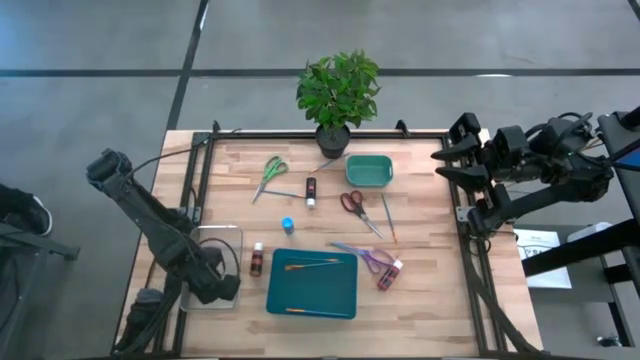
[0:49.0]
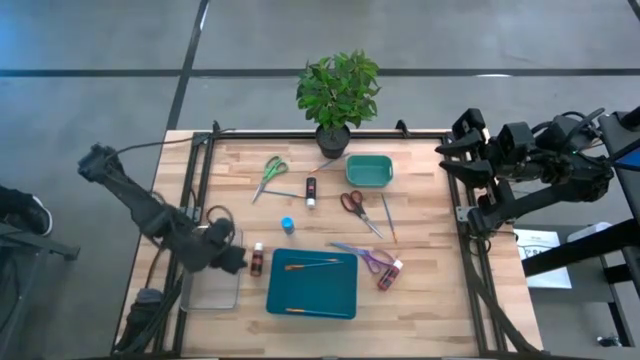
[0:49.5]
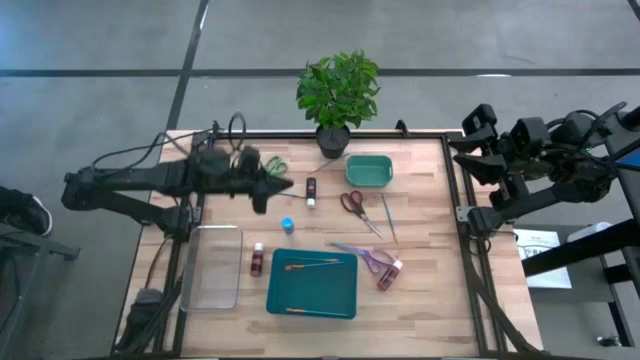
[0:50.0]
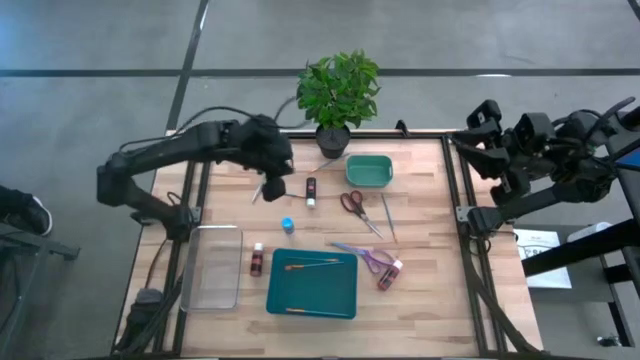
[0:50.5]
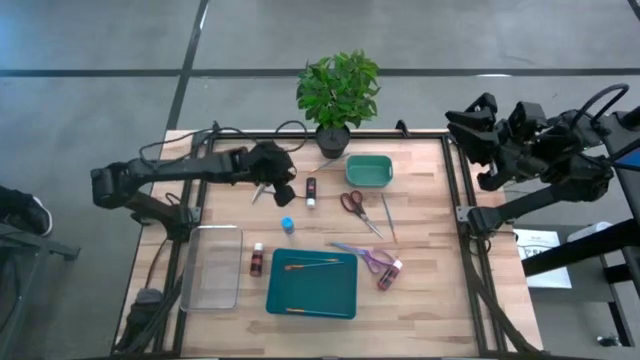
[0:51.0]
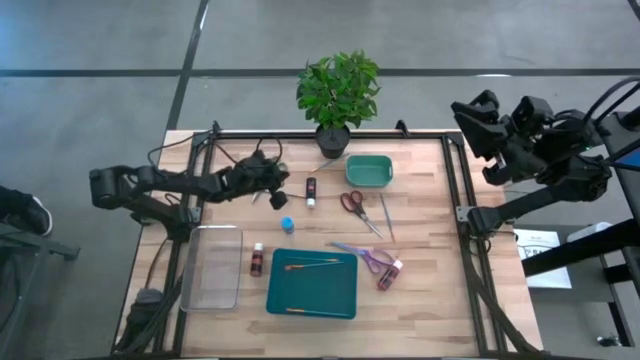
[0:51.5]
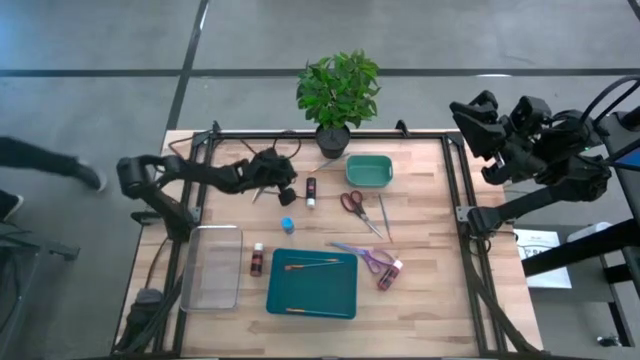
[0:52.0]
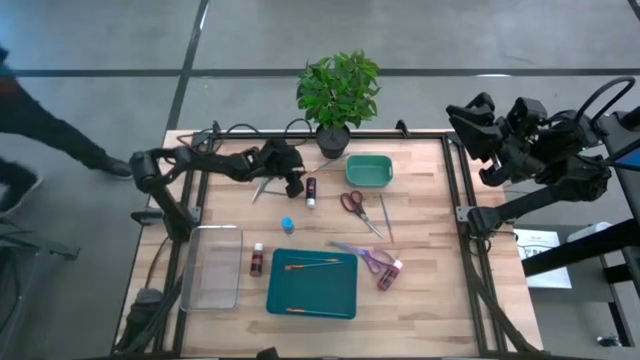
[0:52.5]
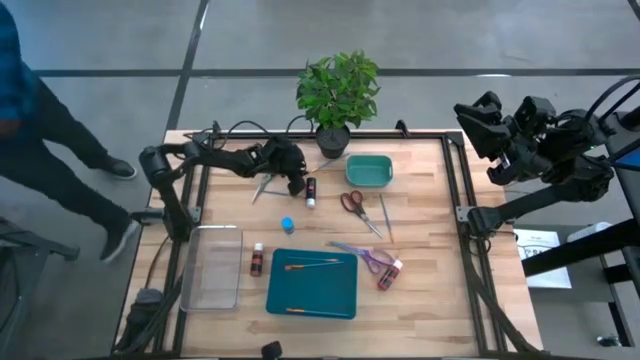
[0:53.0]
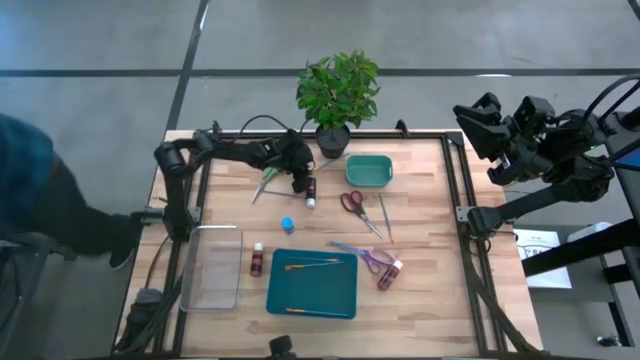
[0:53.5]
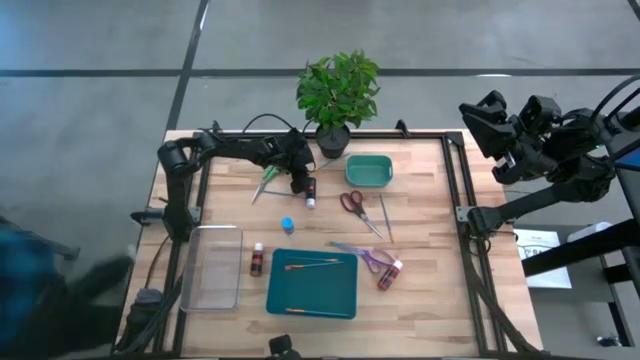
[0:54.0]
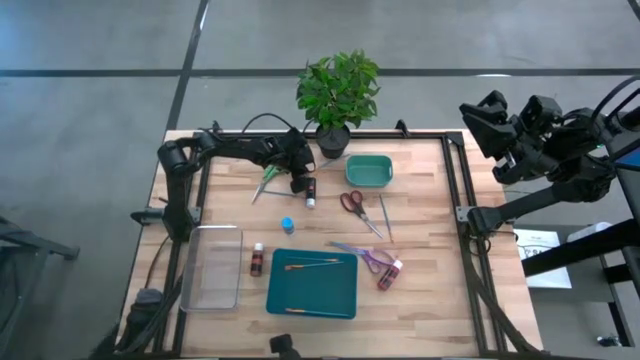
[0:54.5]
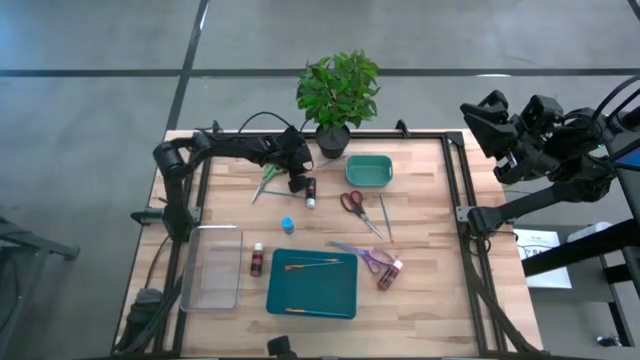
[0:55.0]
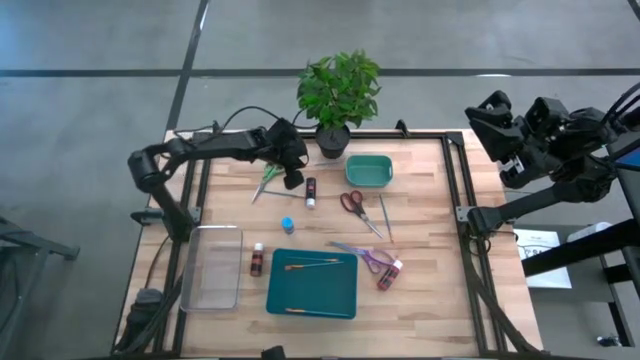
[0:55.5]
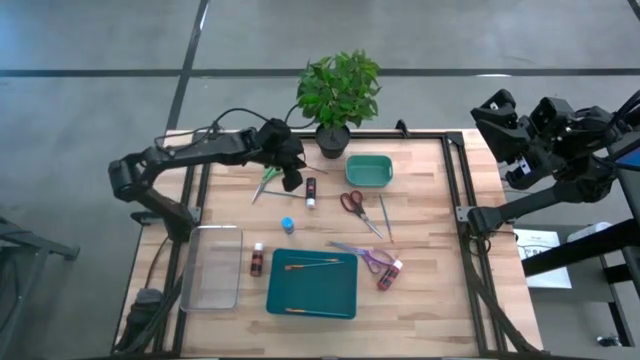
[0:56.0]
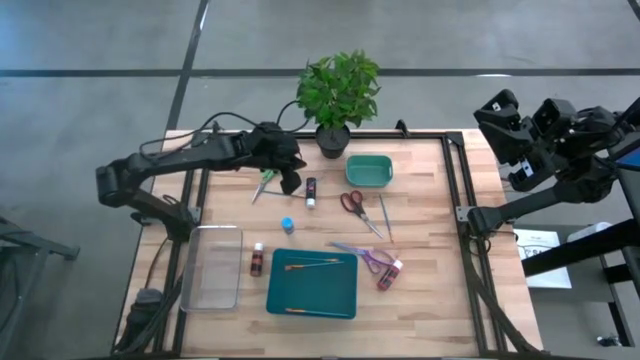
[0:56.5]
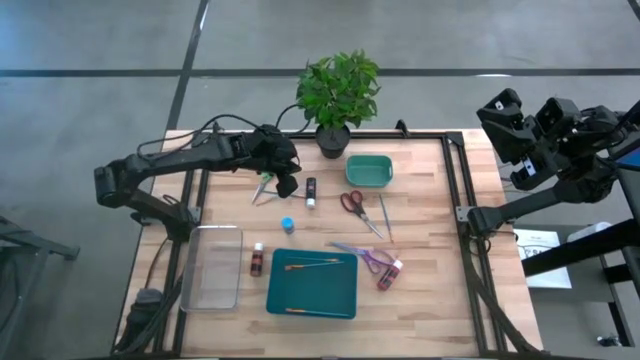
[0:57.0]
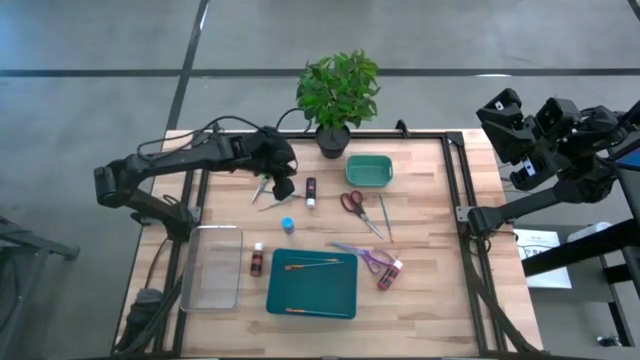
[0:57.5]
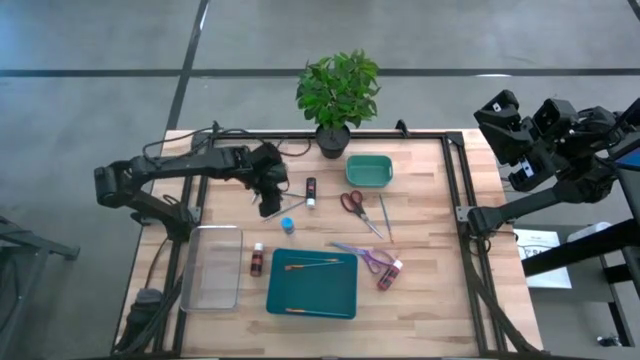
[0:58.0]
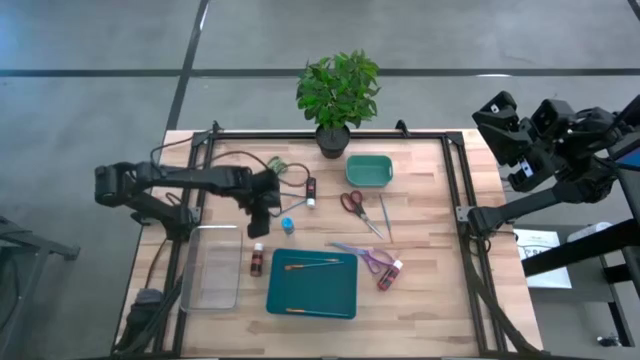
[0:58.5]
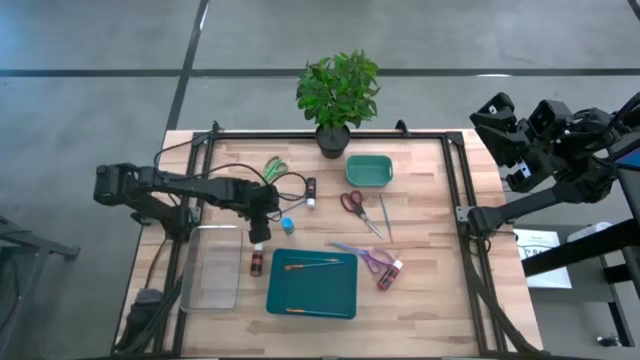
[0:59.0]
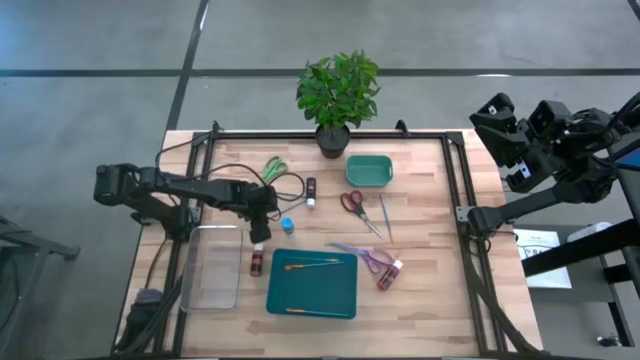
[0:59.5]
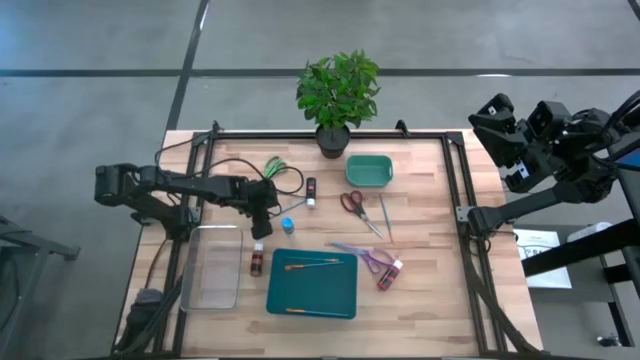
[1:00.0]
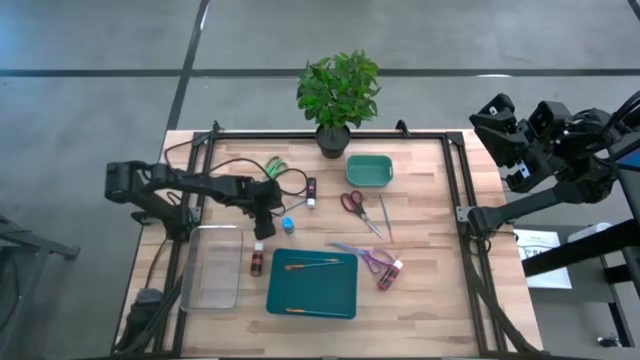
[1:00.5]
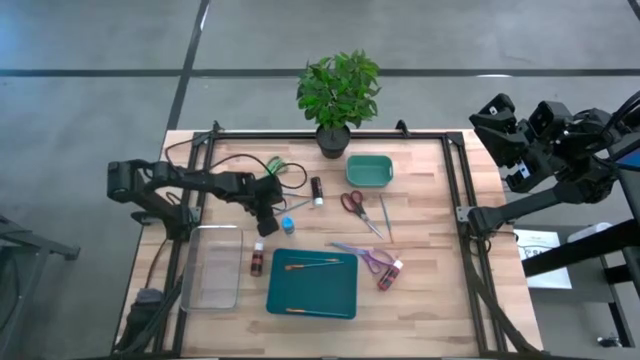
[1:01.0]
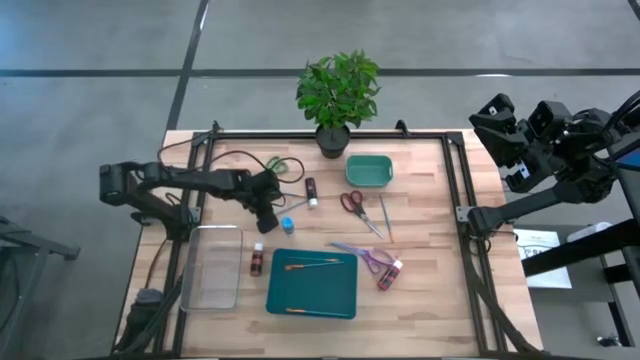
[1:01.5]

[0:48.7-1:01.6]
Task: Pick & Place Paint Supplies
Put the blue paint brush into the blue bin

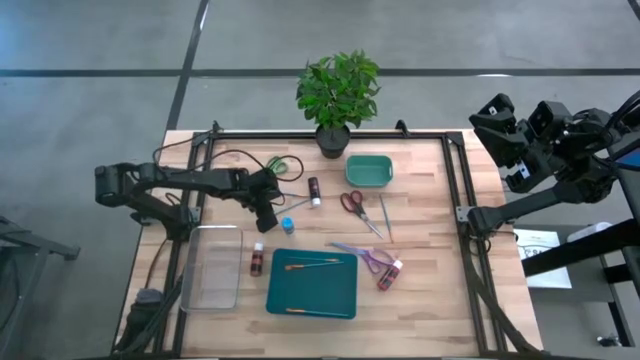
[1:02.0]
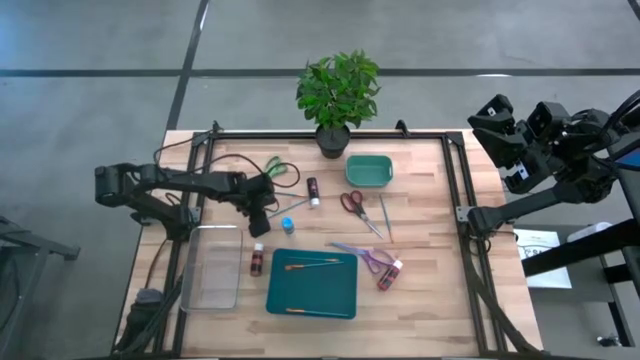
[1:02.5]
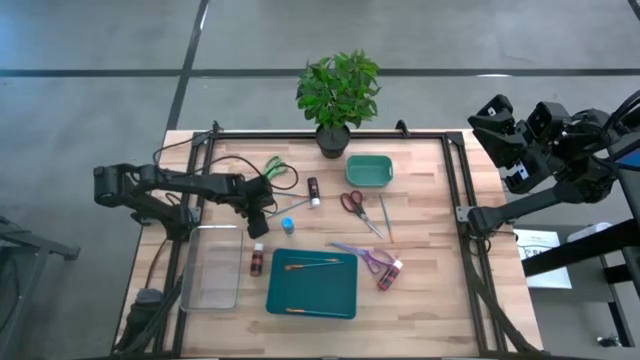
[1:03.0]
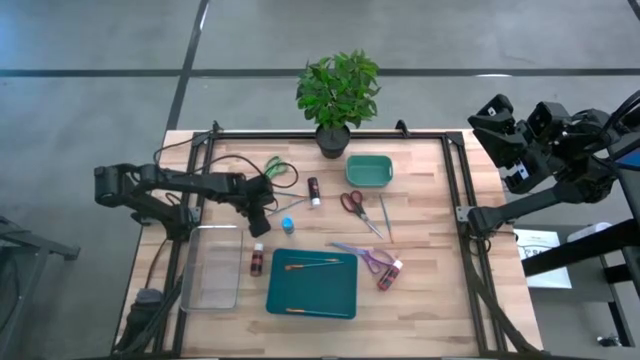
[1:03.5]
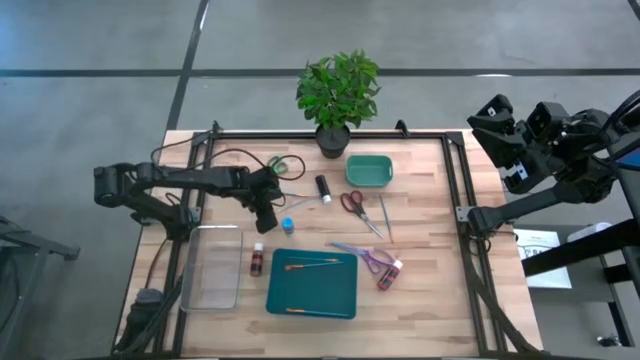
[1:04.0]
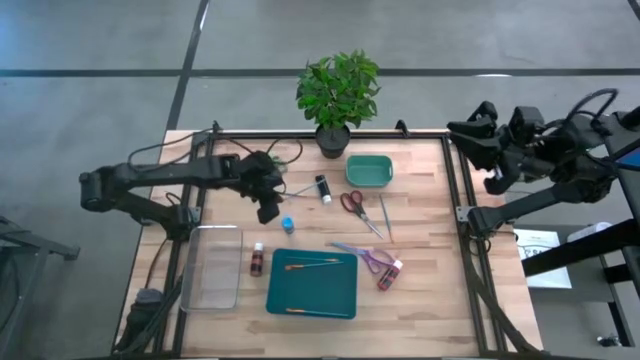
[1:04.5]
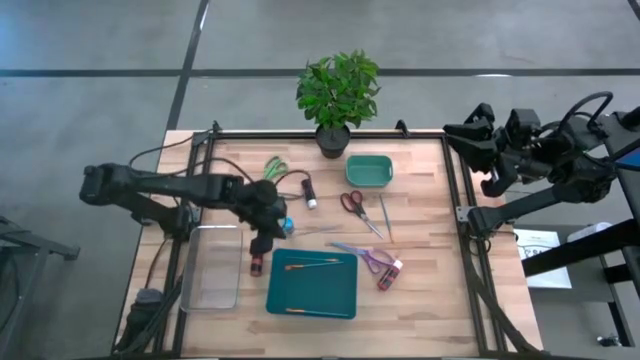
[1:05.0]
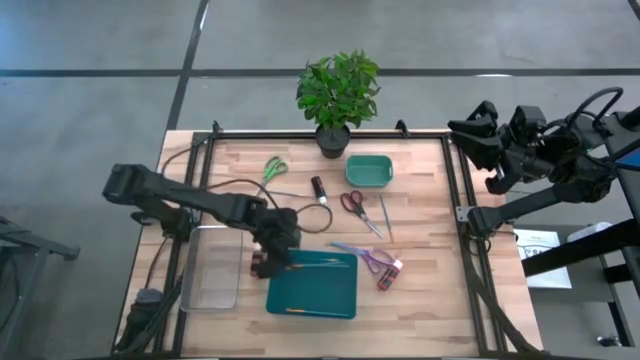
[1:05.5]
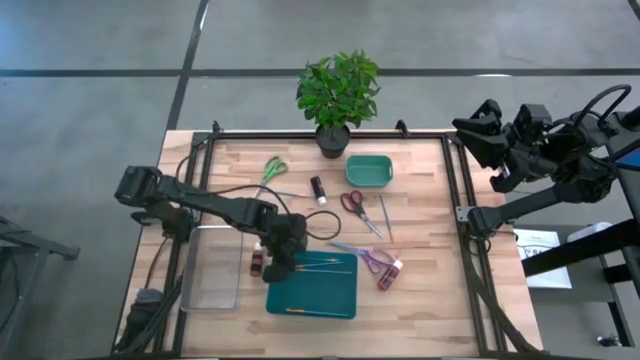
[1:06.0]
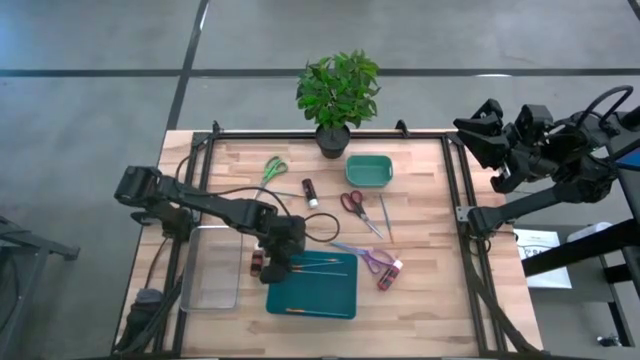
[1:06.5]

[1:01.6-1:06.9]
Put the blue paint brush into the blue bin

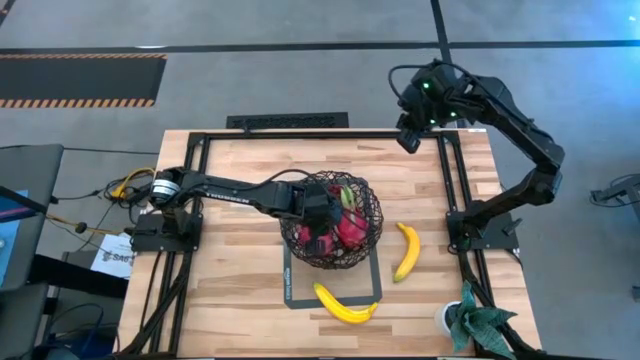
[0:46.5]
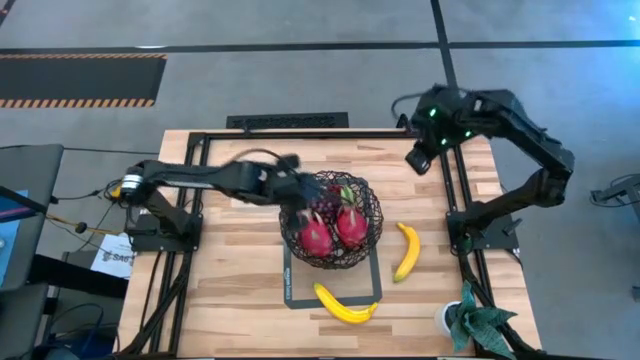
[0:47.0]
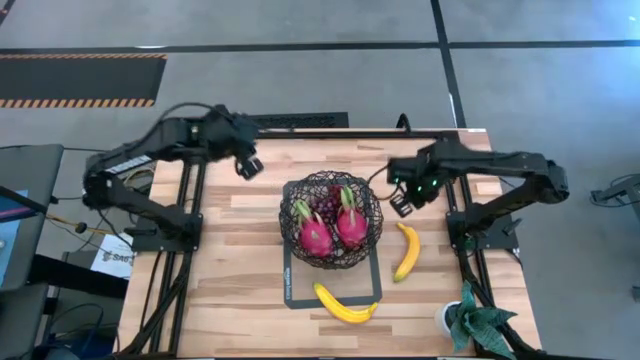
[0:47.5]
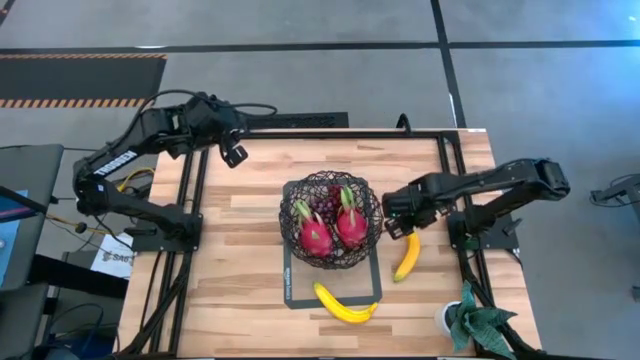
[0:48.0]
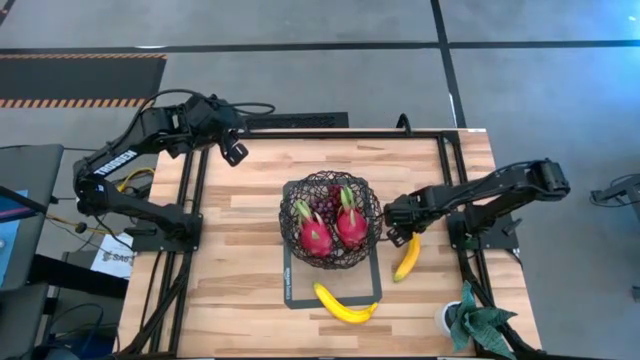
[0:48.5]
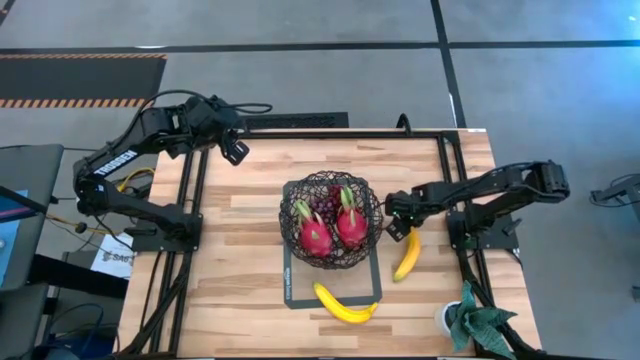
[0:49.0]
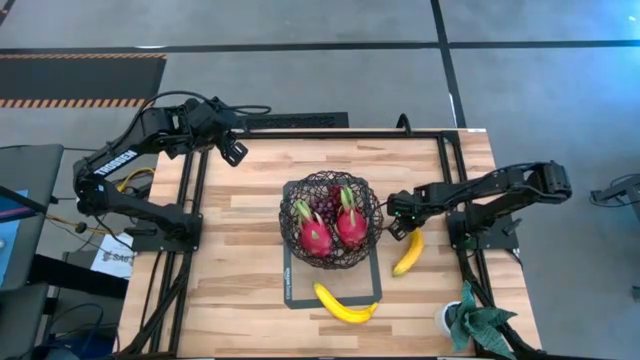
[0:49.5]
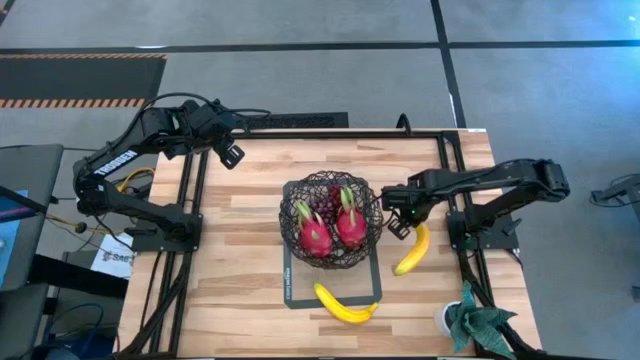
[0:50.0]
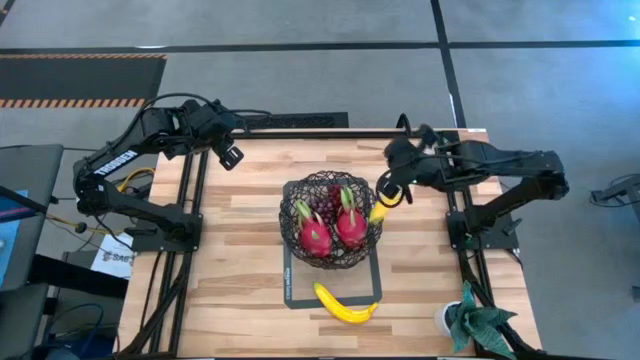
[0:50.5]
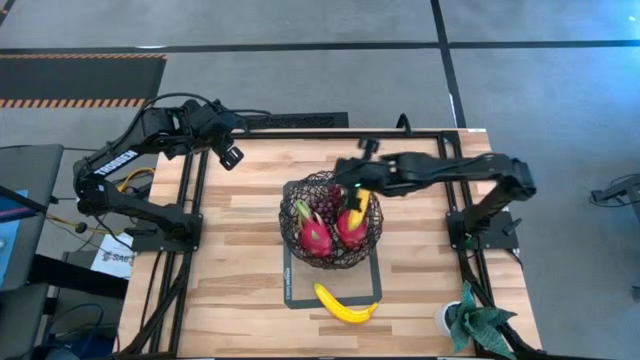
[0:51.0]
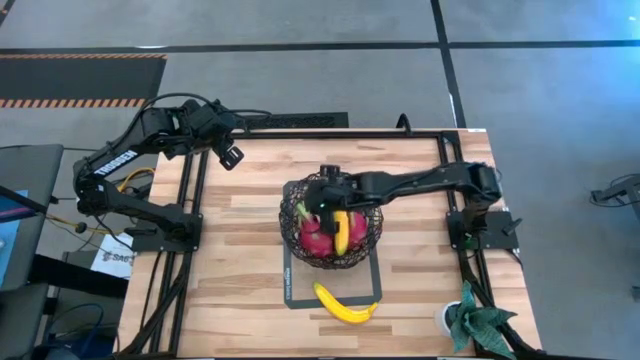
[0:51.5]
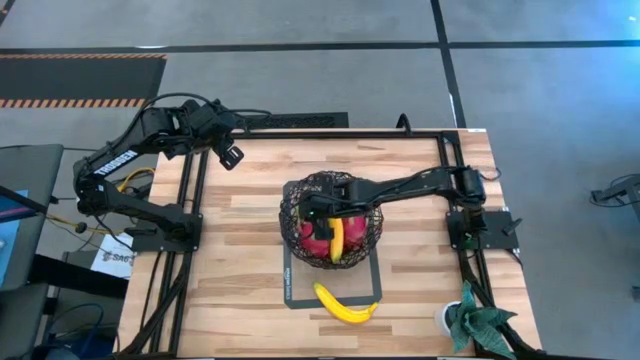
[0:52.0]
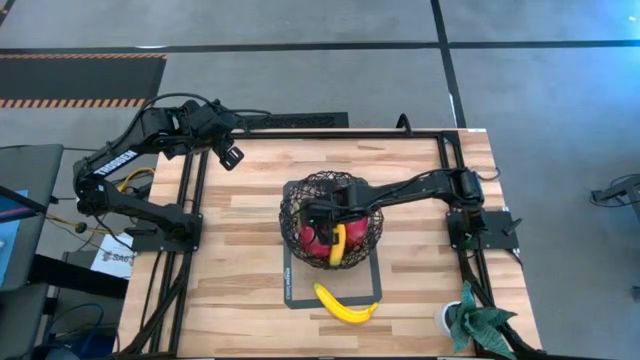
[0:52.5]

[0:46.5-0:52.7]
Task: Build produce basket
Put the top yellow banana into the black wire basket
